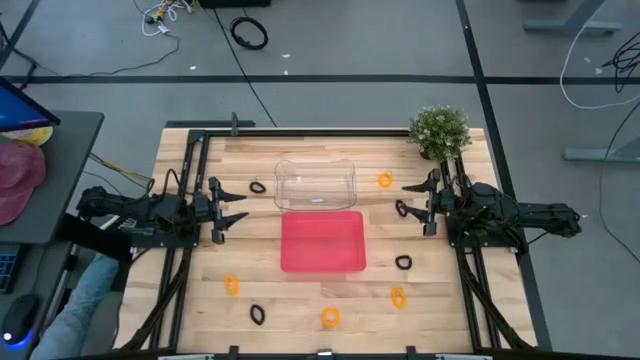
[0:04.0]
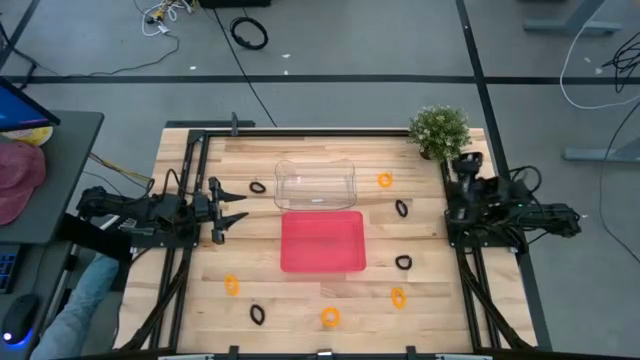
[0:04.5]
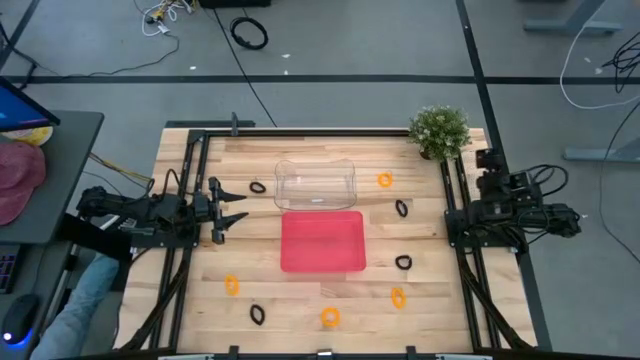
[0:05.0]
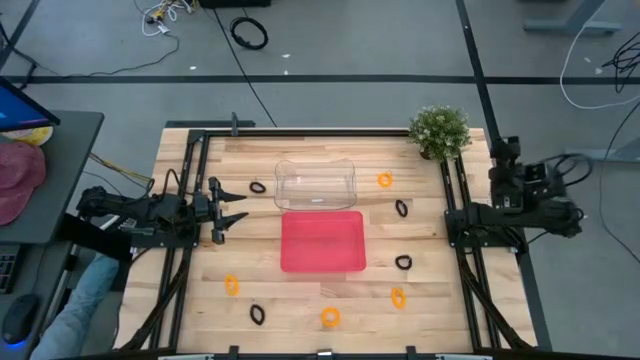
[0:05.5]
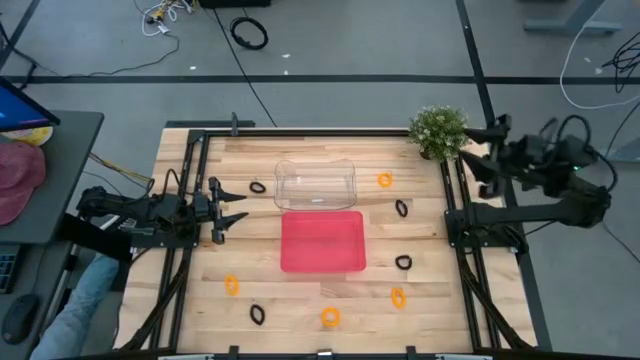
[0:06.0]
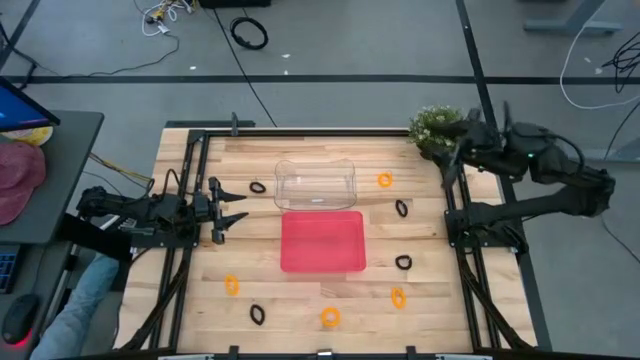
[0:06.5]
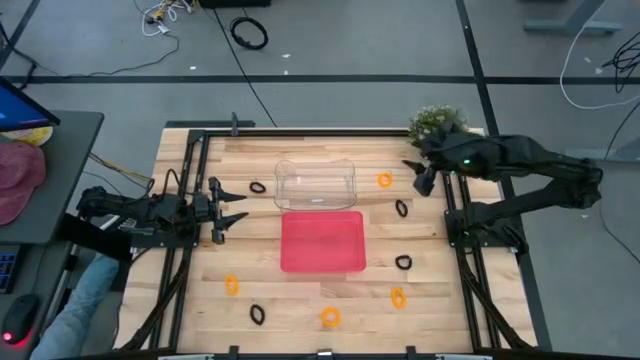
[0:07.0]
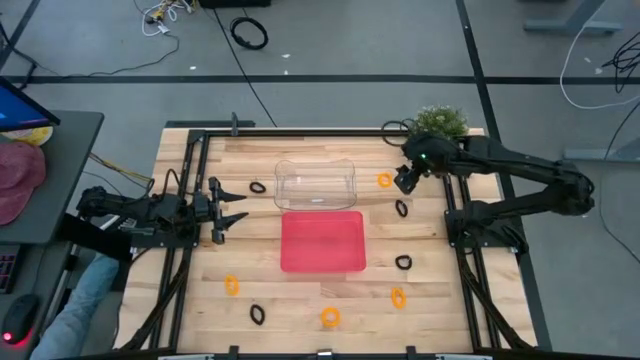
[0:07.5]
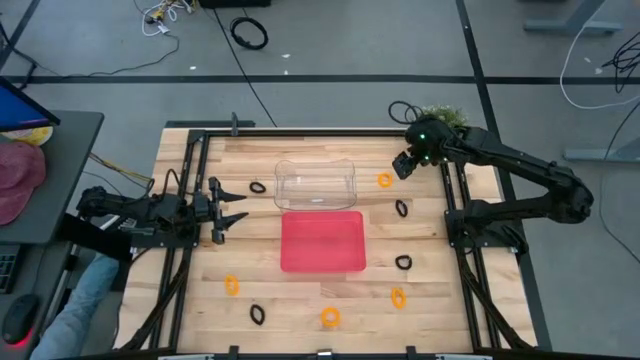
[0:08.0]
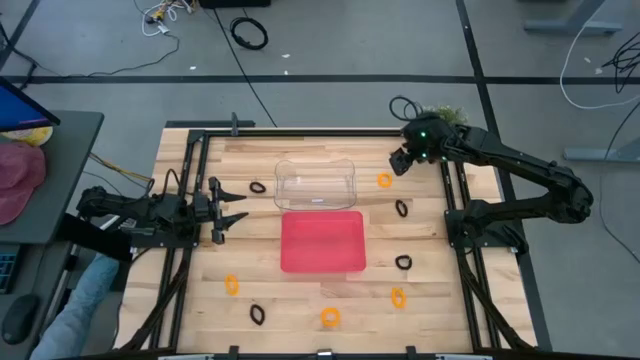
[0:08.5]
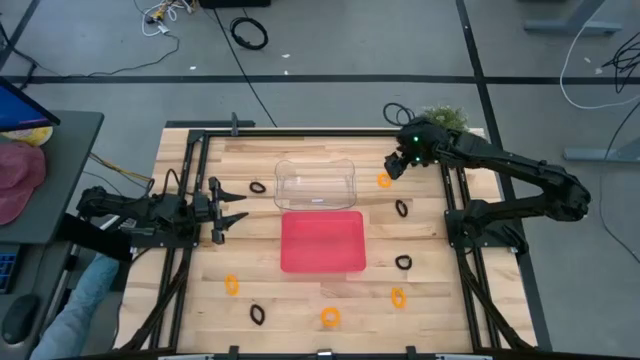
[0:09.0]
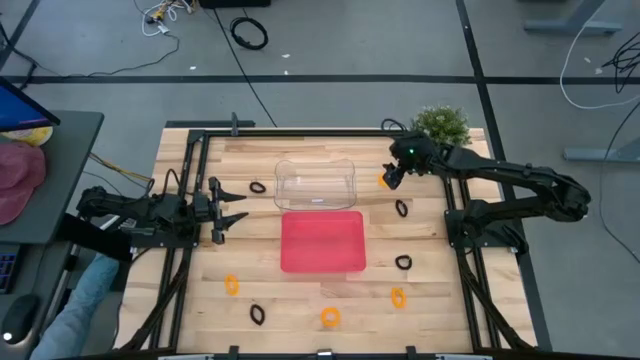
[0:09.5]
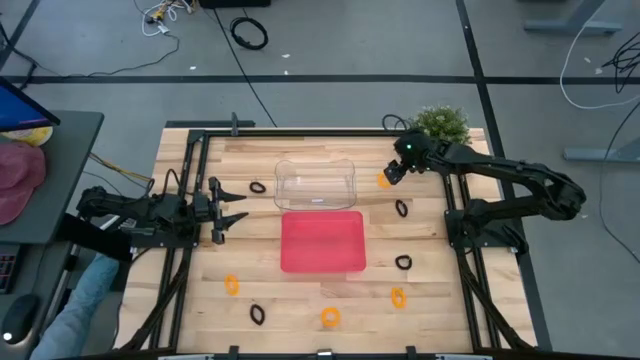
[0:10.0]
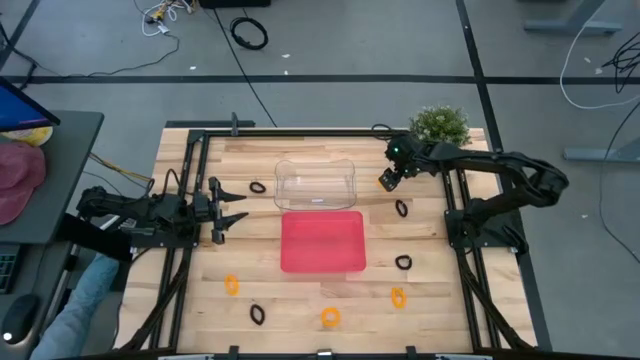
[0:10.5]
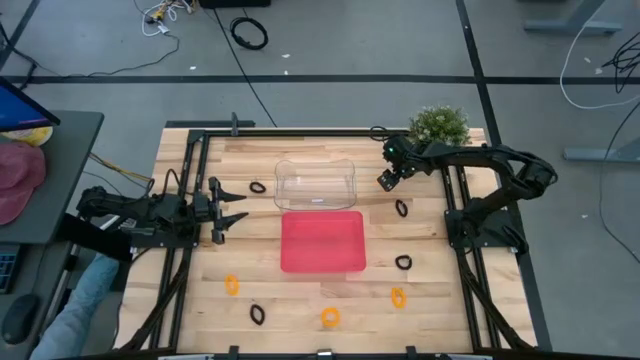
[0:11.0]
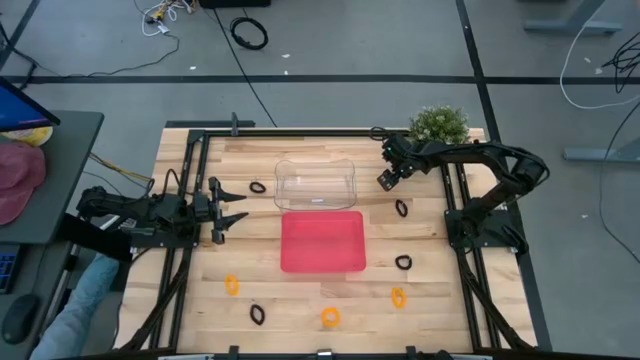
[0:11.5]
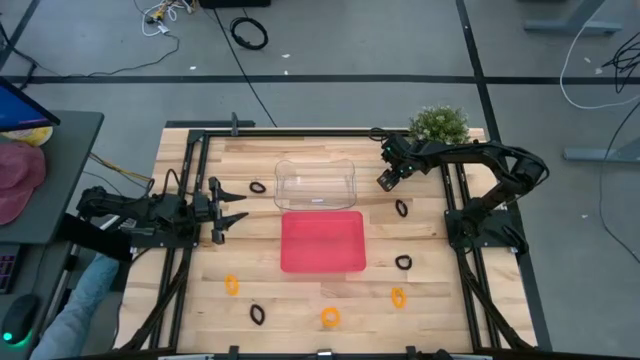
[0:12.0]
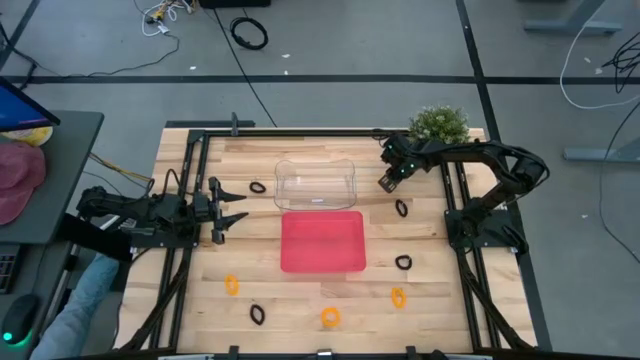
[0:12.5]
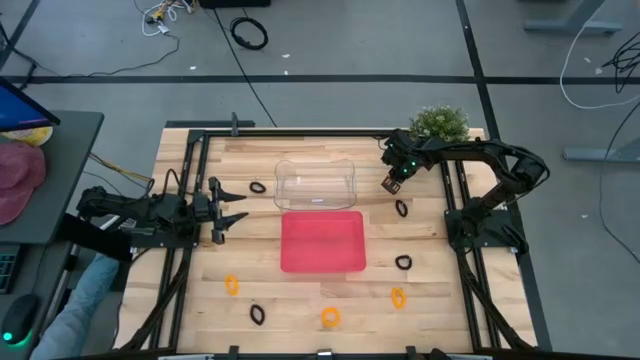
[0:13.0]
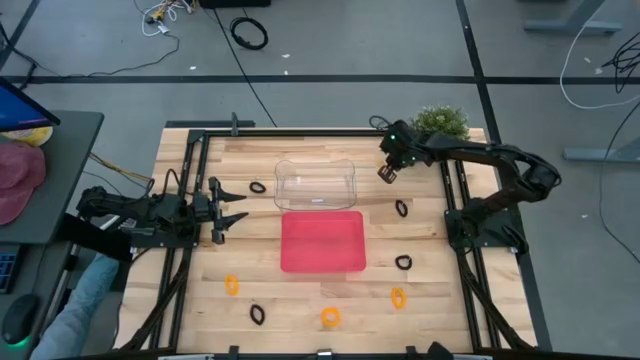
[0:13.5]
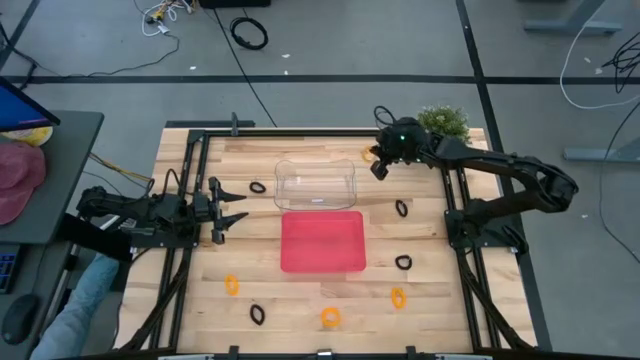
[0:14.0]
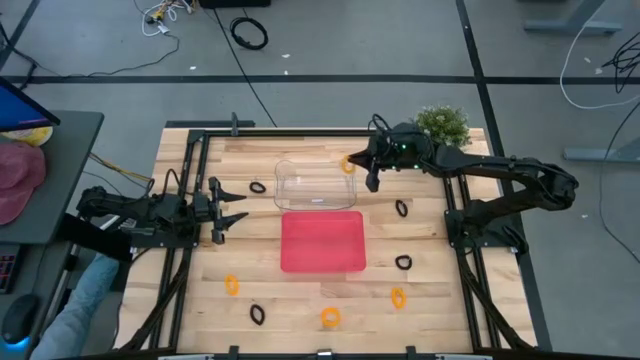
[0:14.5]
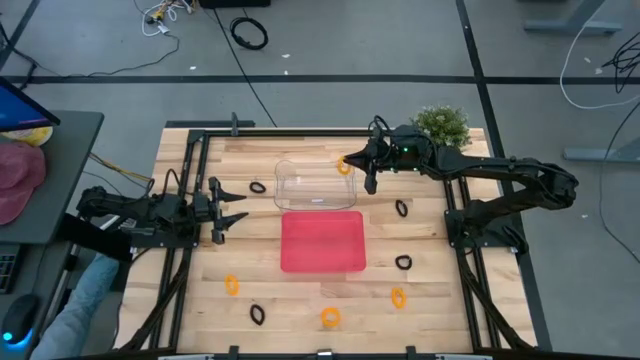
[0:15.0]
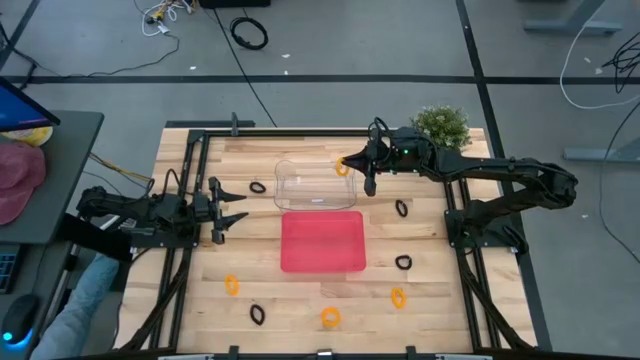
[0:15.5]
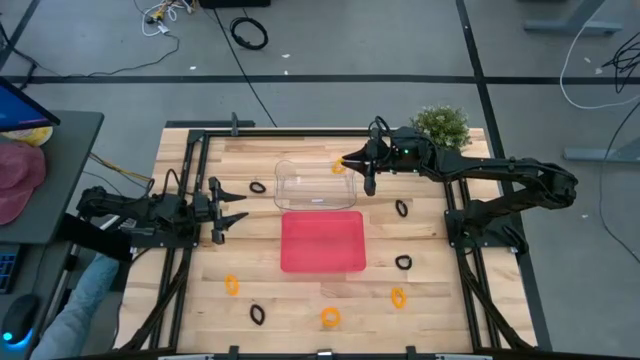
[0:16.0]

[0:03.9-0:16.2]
Task: Sort spring keychains
Put the yellow spring keychain into the transparent bin

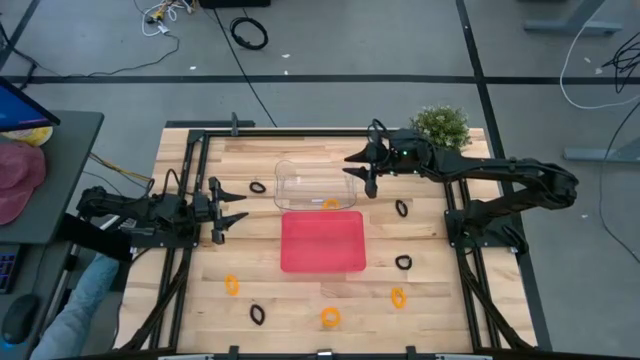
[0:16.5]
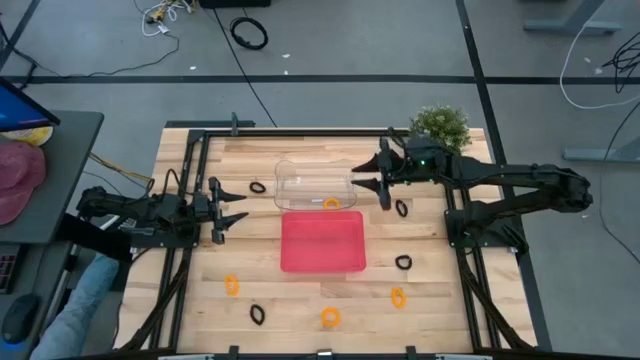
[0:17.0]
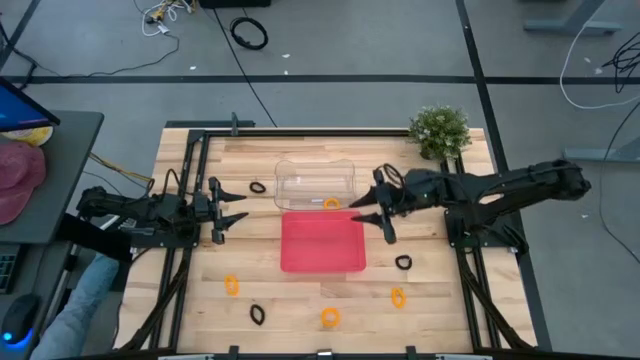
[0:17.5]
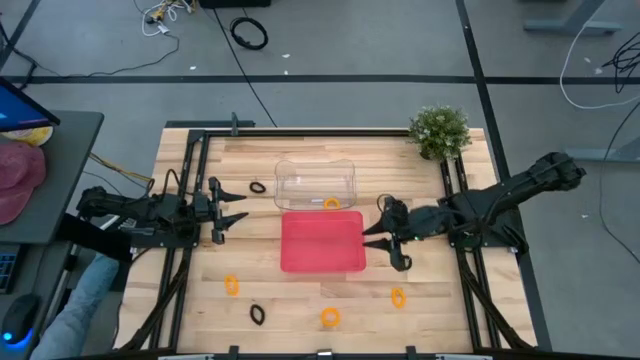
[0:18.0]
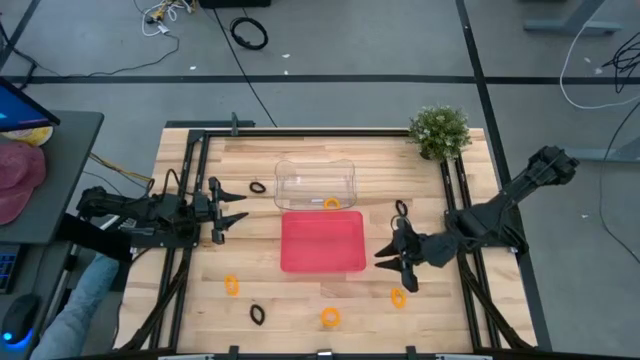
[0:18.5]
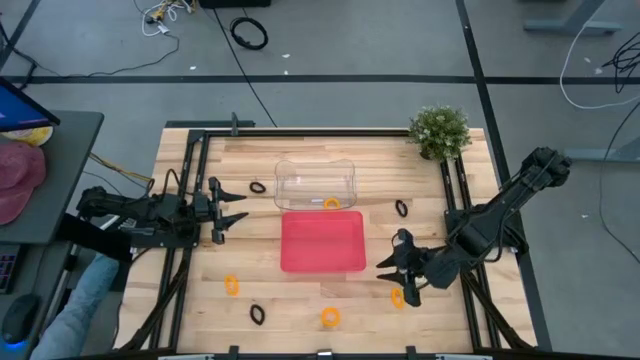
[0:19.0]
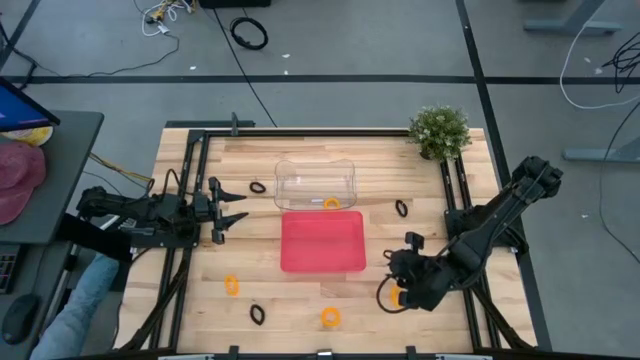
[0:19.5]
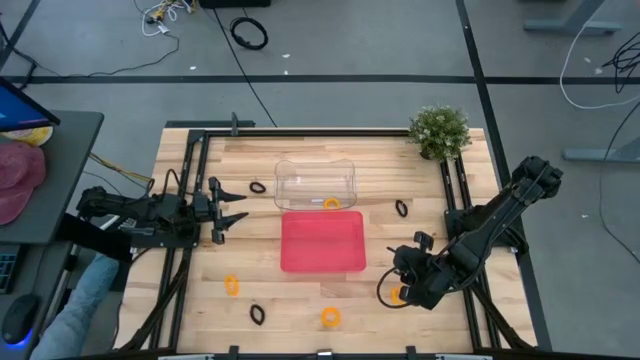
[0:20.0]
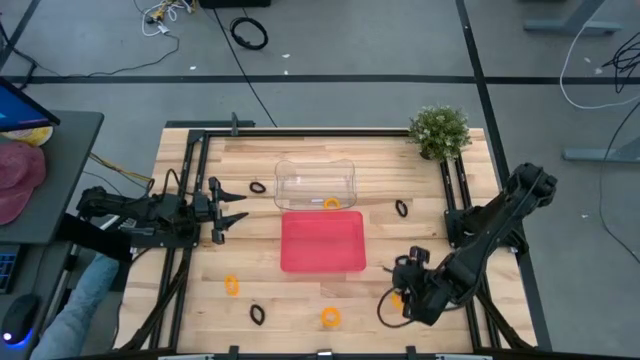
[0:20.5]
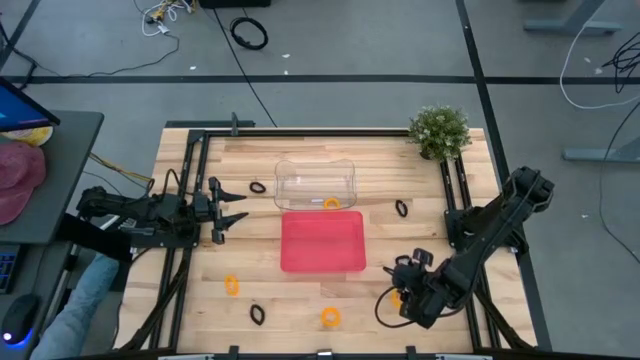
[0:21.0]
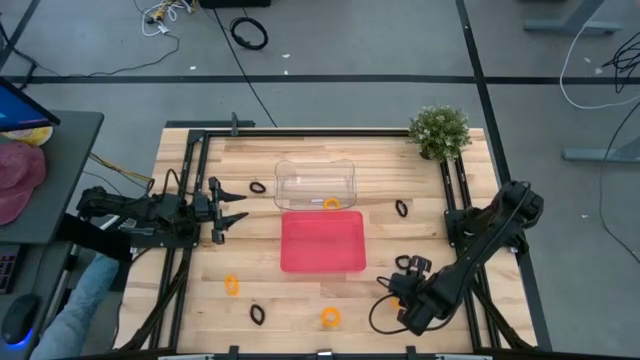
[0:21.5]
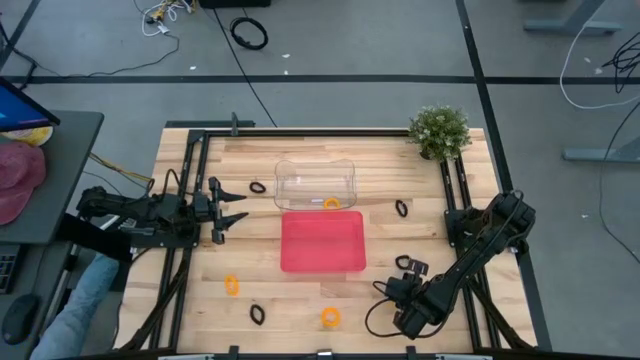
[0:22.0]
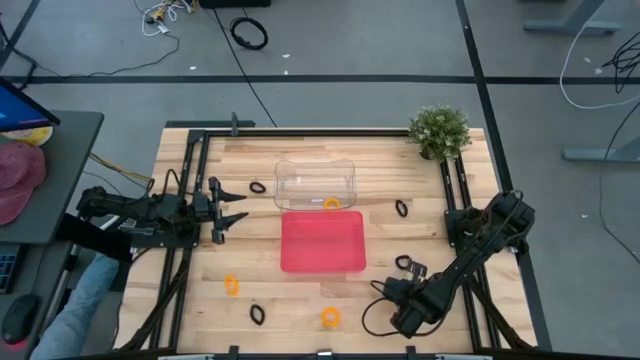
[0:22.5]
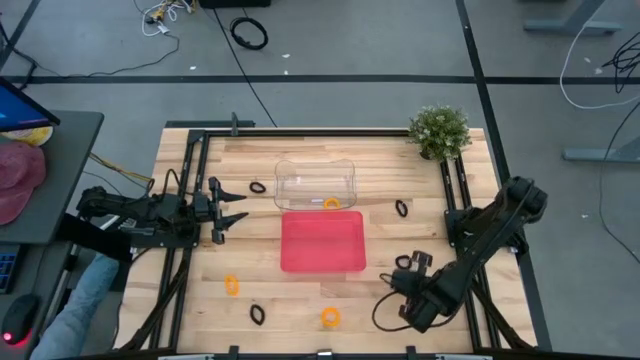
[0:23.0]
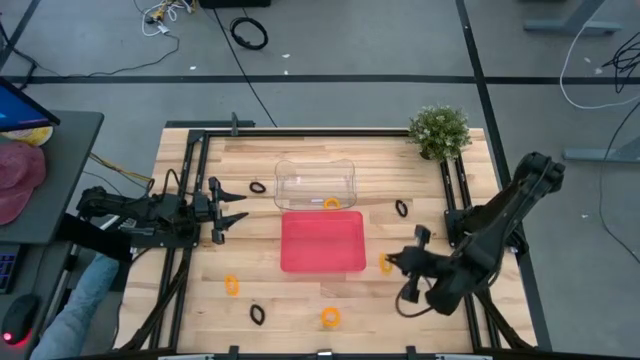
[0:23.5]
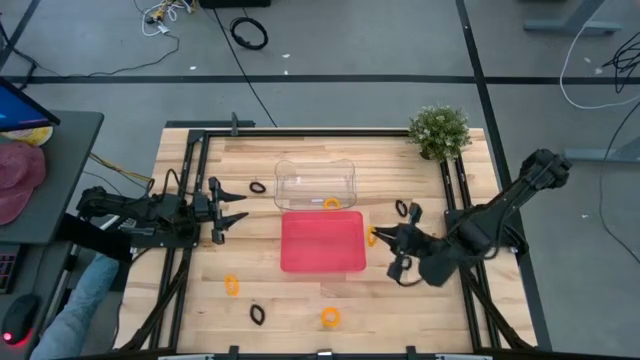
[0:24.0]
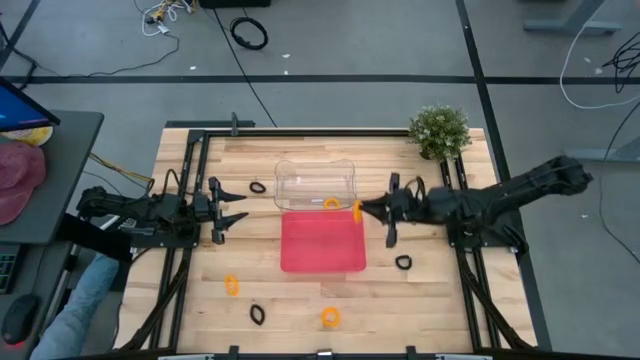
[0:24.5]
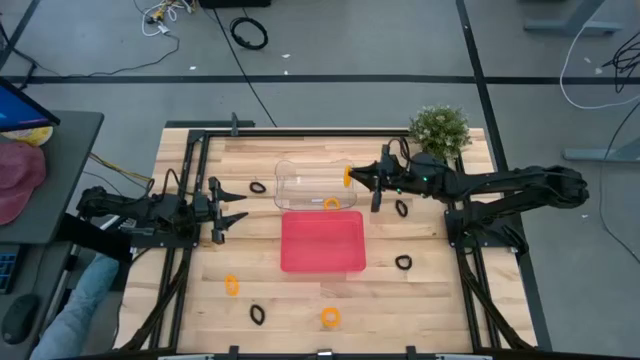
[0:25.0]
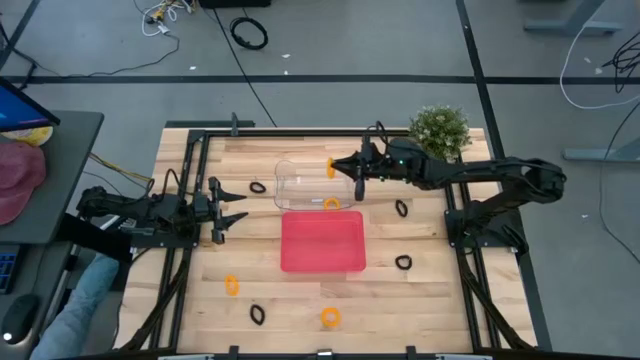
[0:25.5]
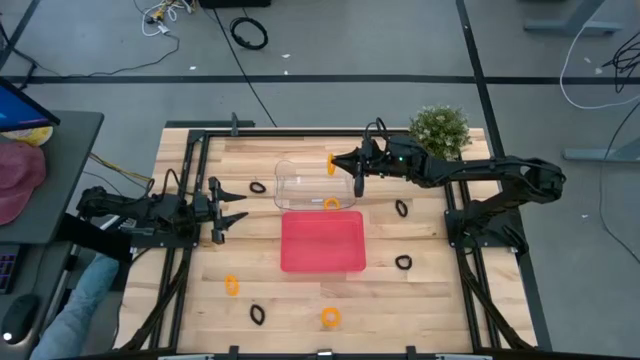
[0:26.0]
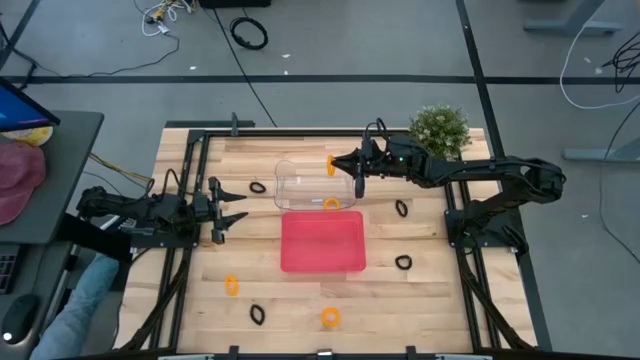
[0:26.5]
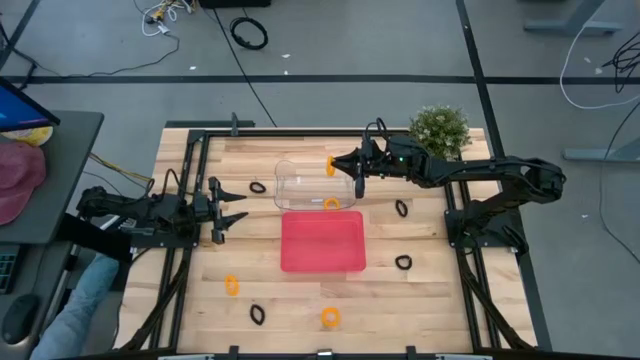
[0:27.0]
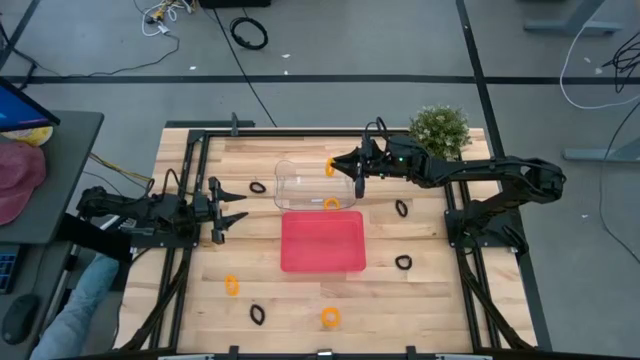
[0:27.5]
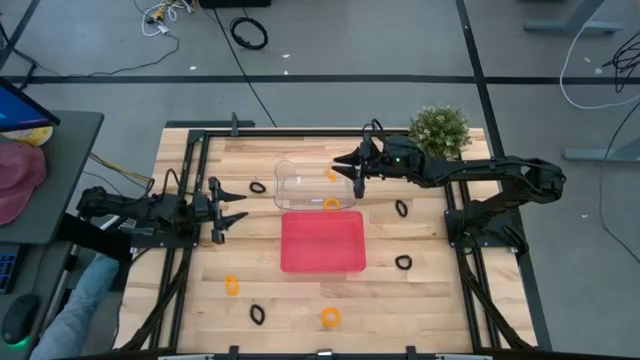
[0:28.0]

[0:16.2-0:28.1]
Put the yellow spring keychain into the transparent bin
